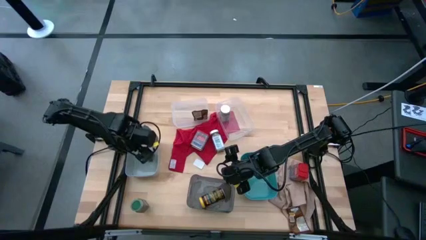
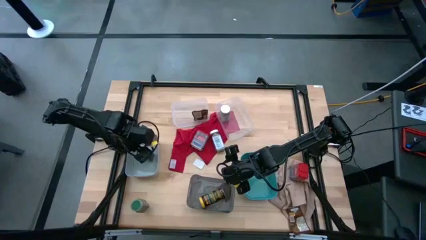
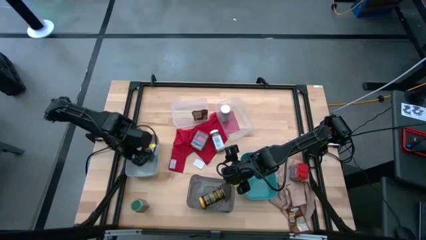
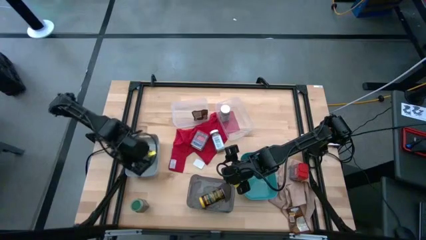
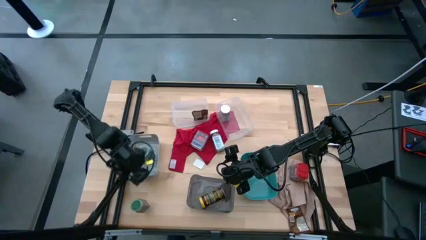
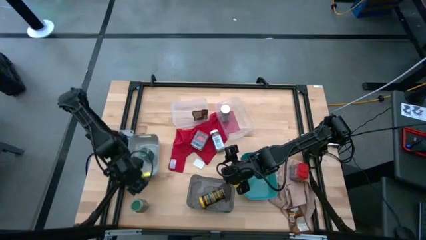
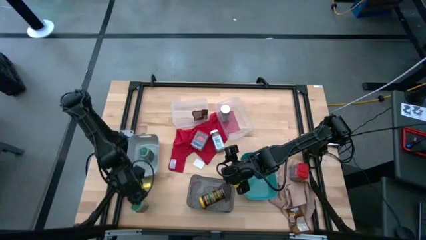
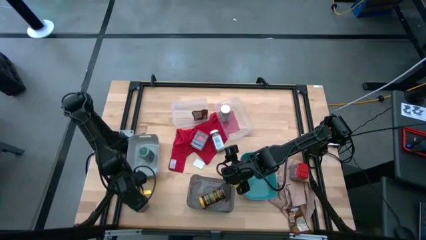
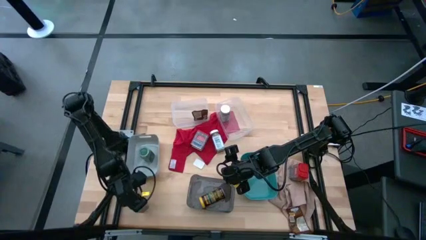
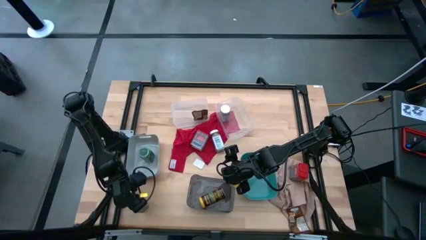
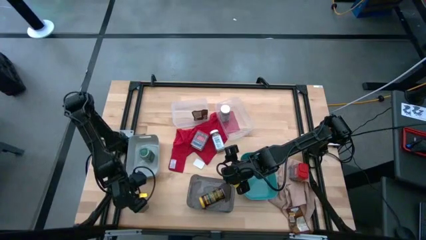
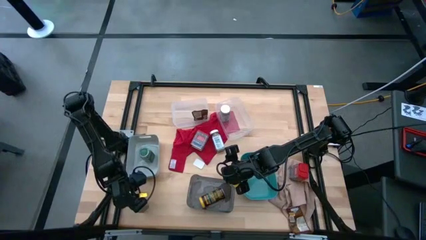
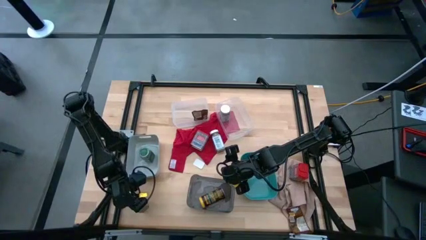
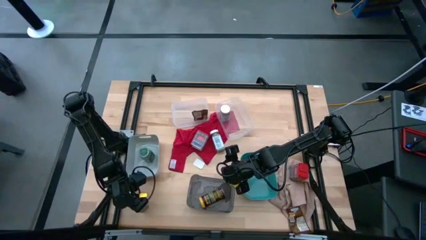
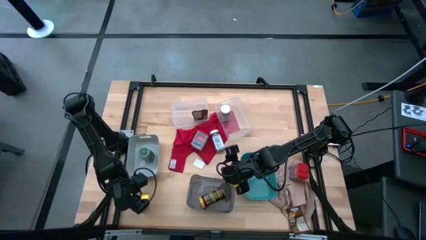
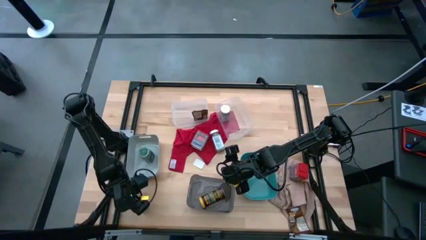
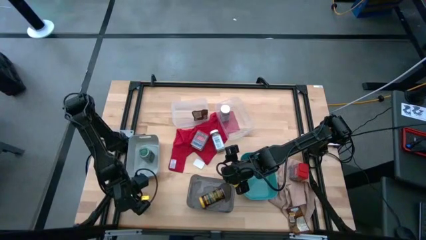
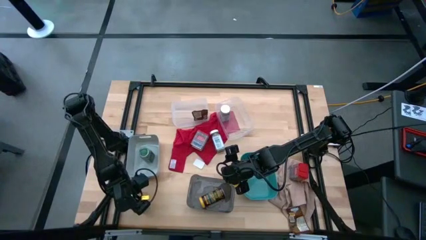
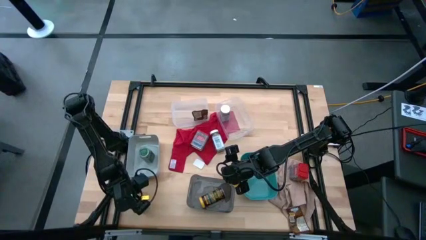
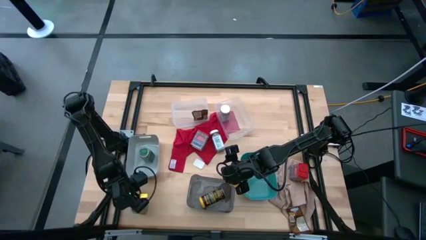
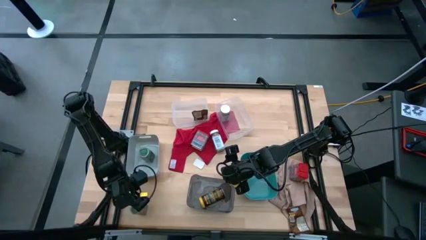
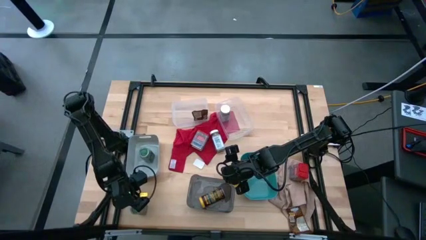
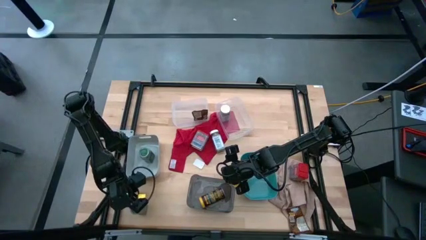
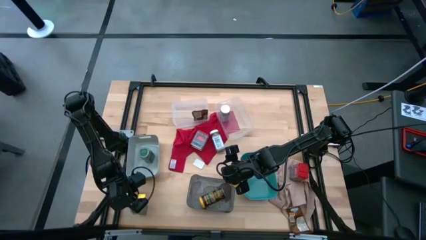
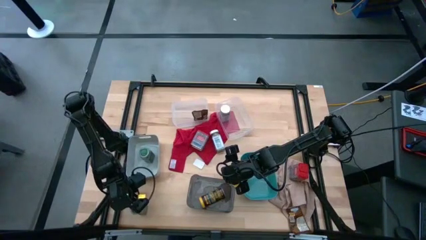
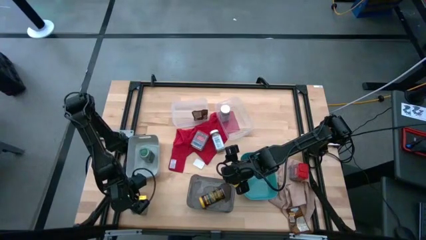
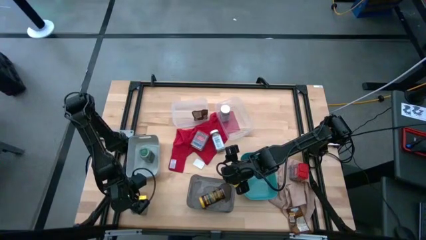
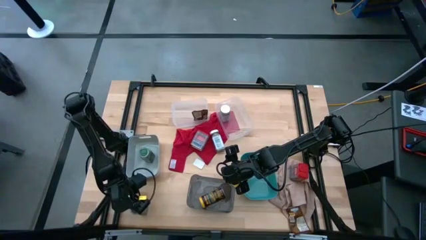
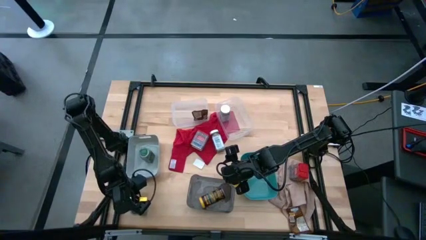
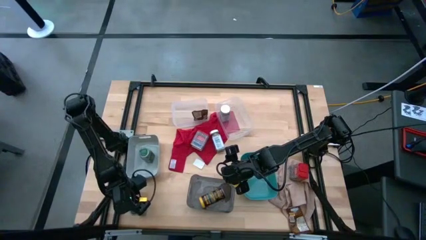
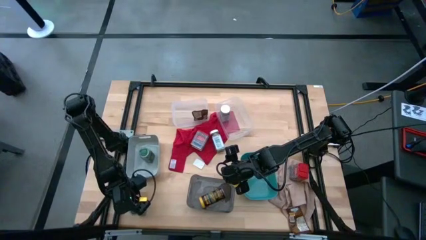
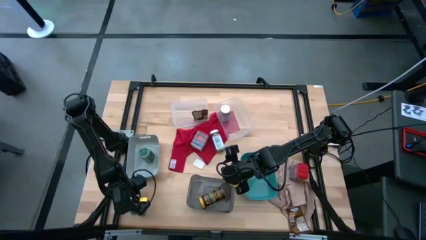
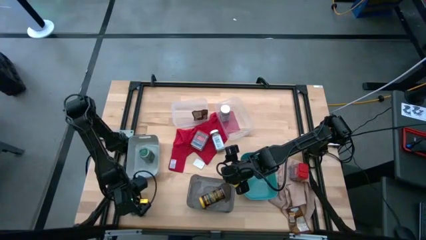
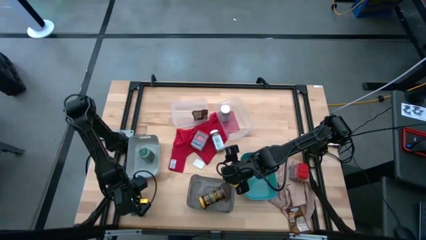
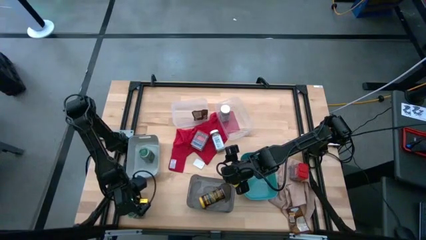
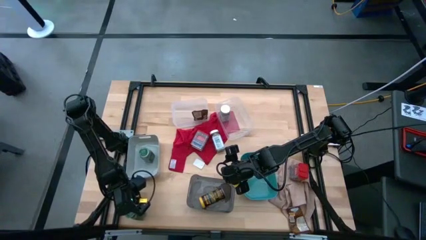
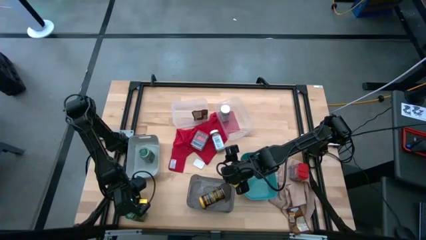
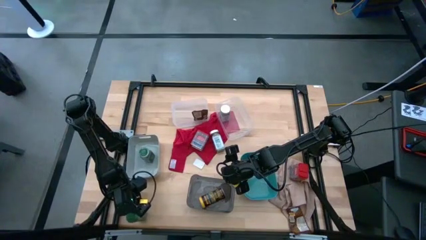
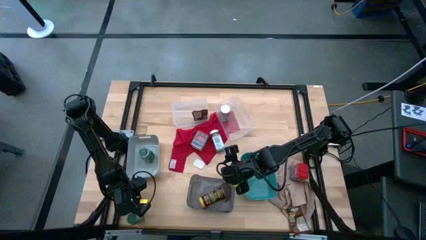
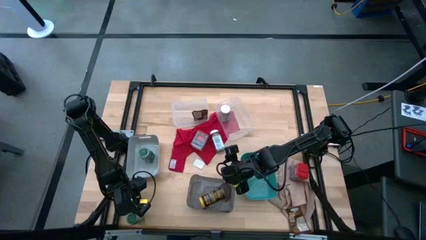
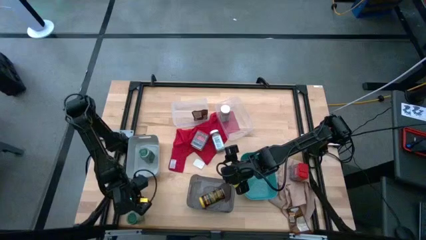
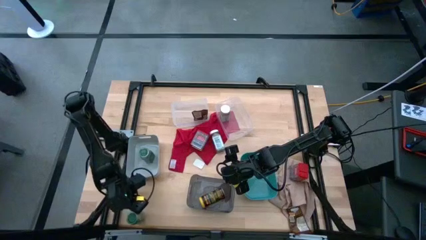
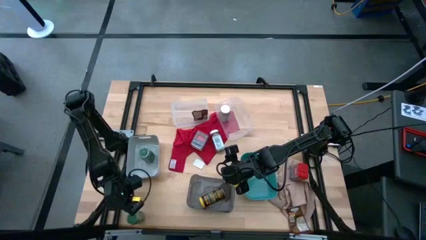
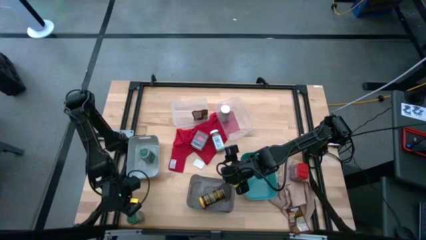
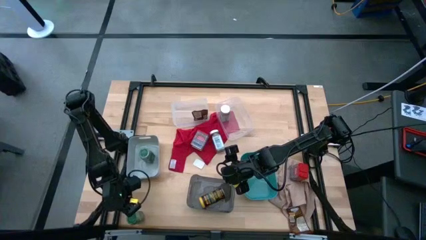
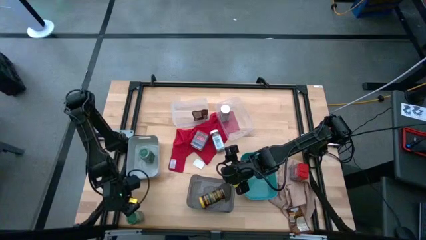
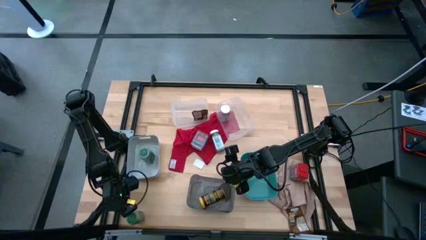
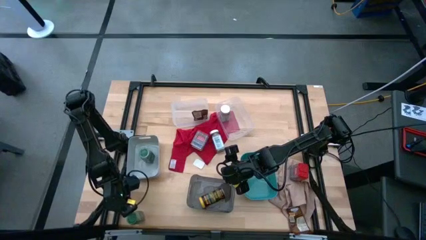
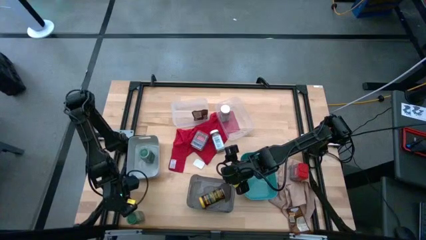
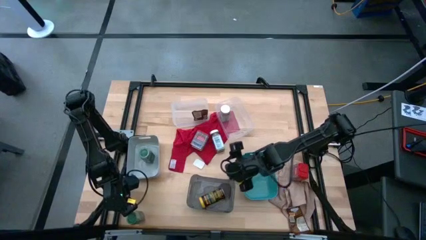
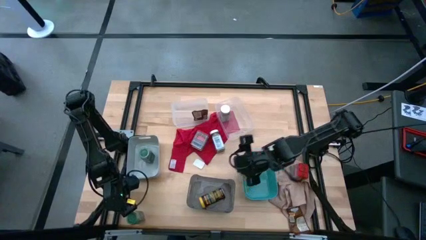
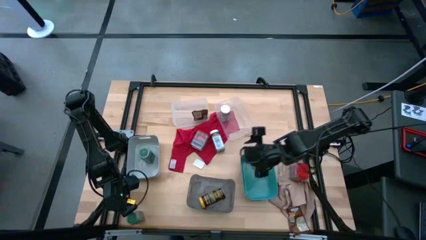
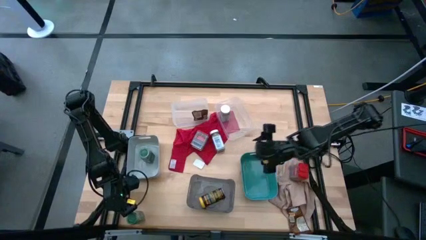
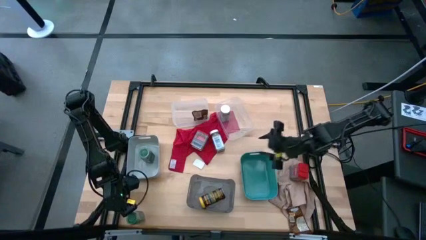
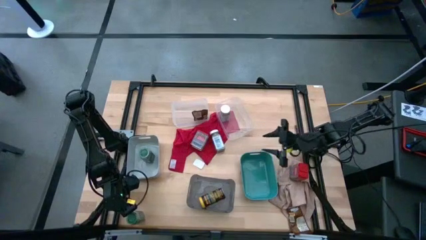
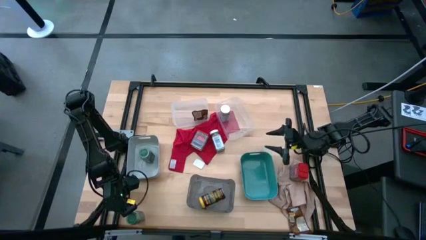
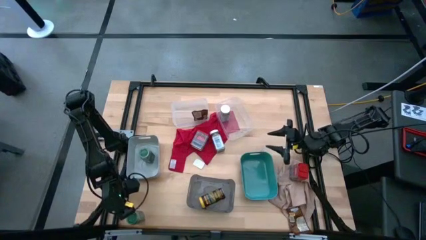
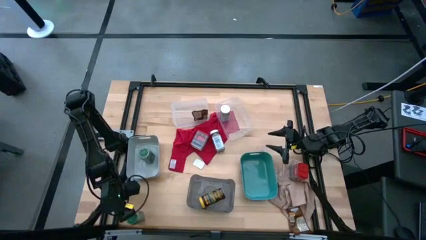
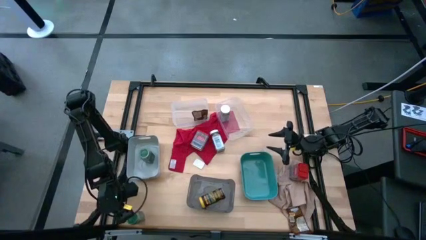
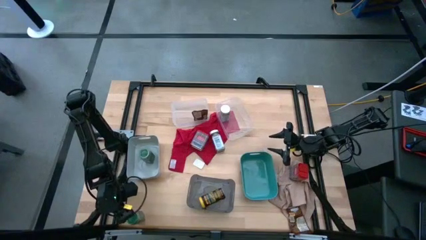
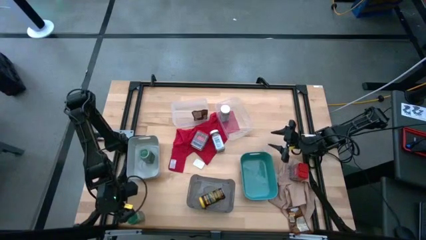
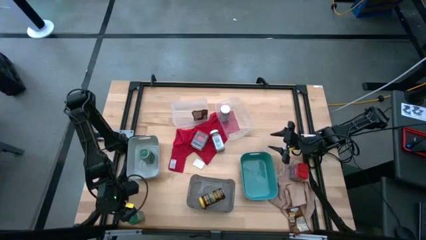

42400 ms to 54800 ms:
Task: Sort spices by type
Put the green seasoning bottle into the gray bin

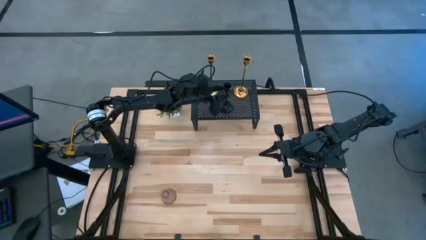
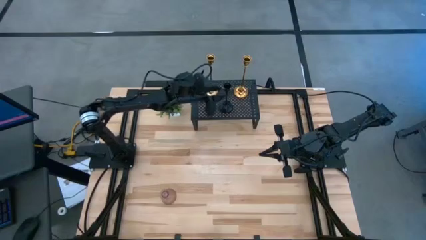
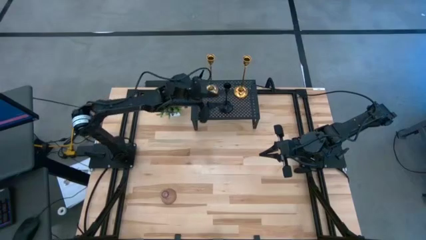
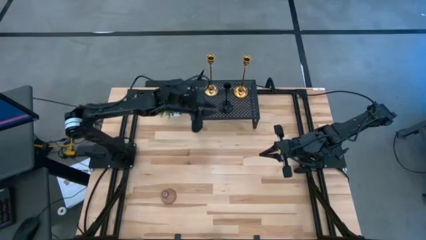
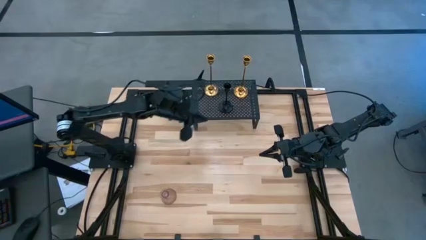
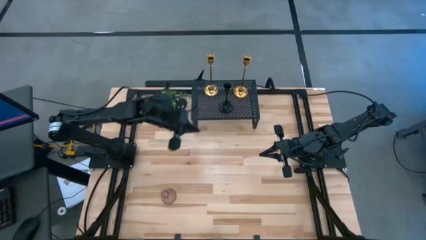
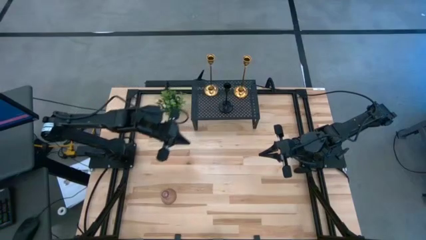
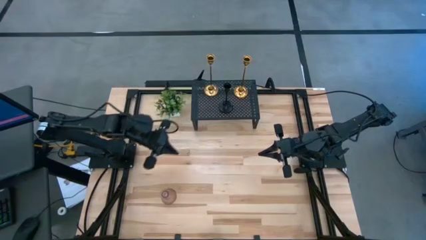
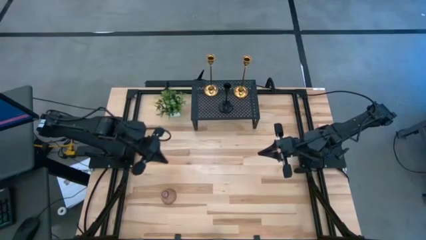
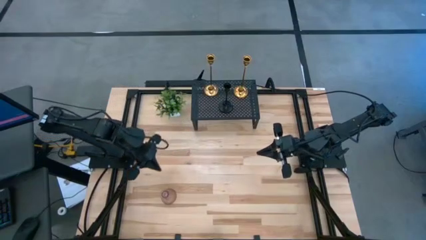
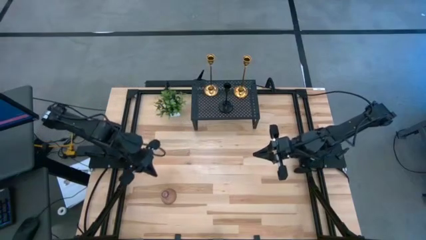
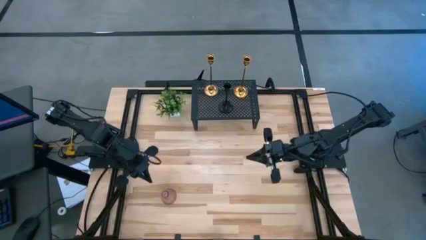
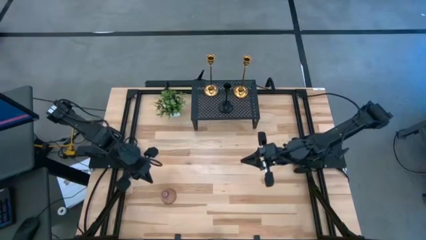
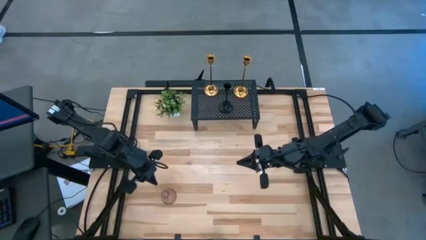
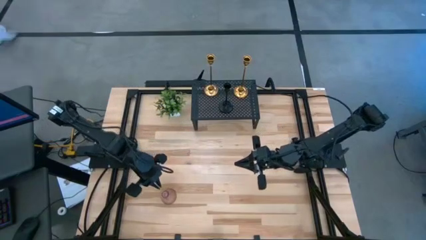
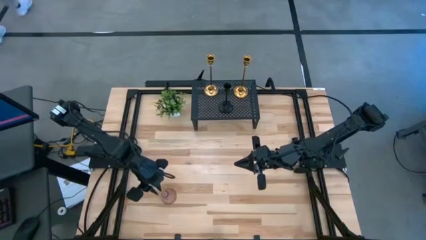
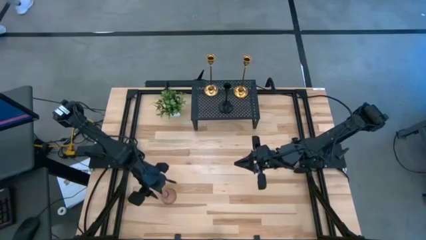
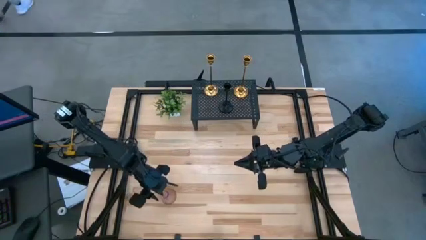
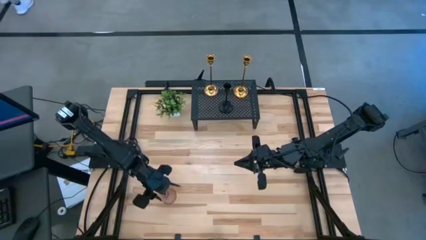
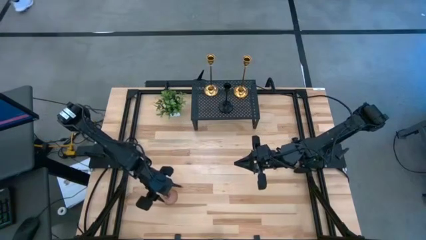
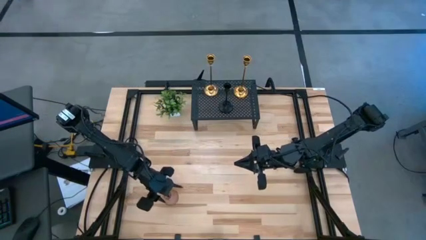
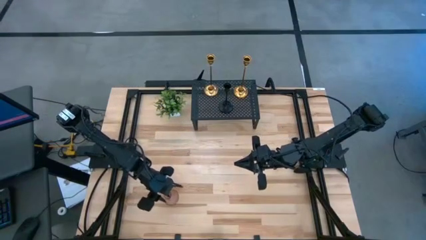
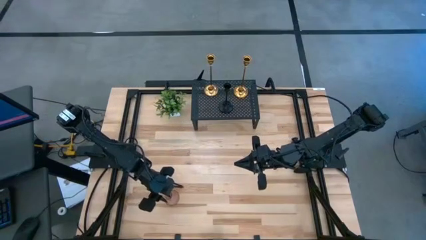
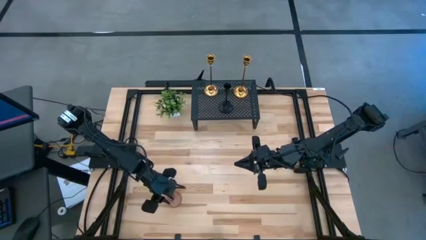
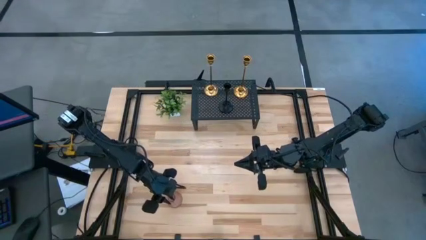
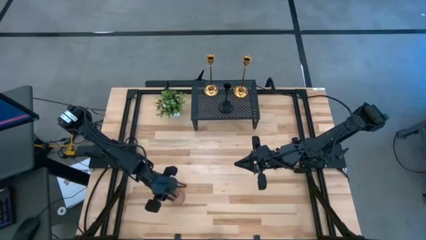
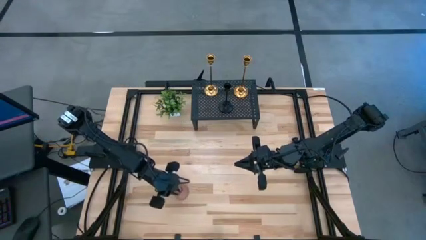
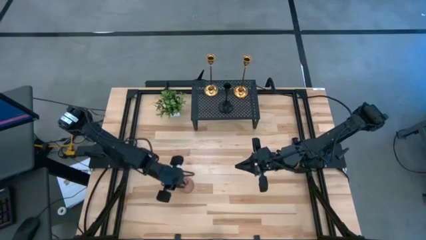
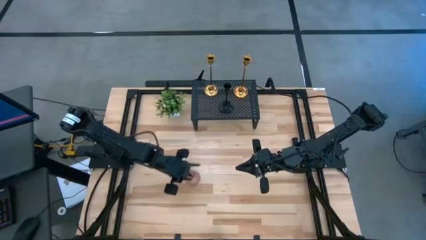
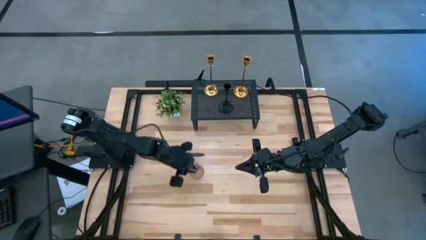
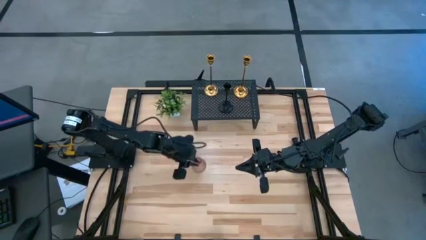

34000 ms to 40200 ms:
Task: Pick & Place candle stick holders
Put the pink glass candle holder on the shelf
